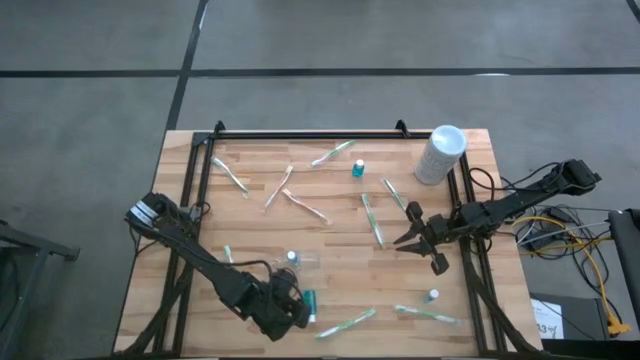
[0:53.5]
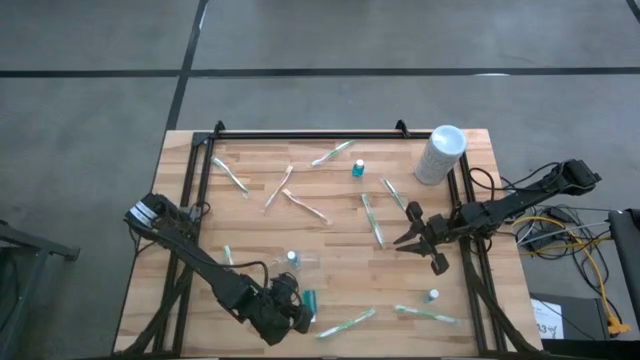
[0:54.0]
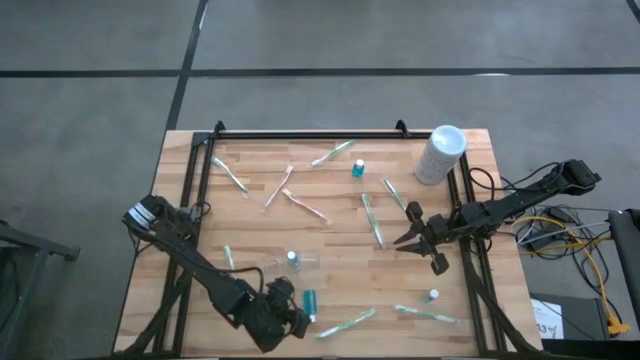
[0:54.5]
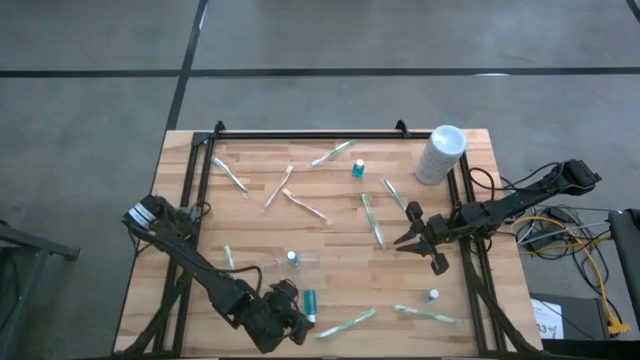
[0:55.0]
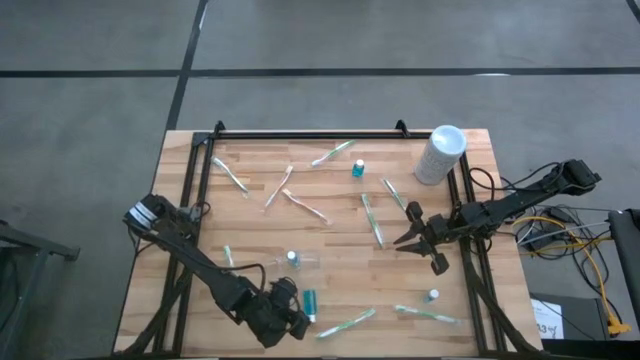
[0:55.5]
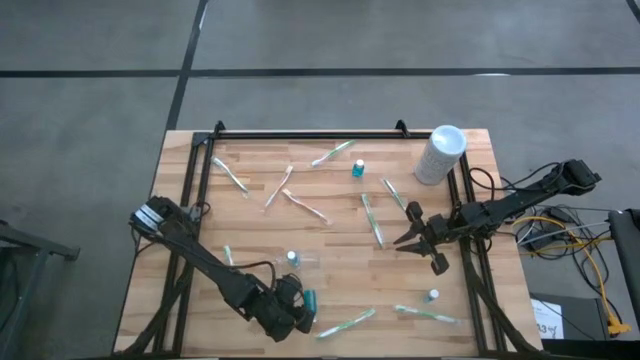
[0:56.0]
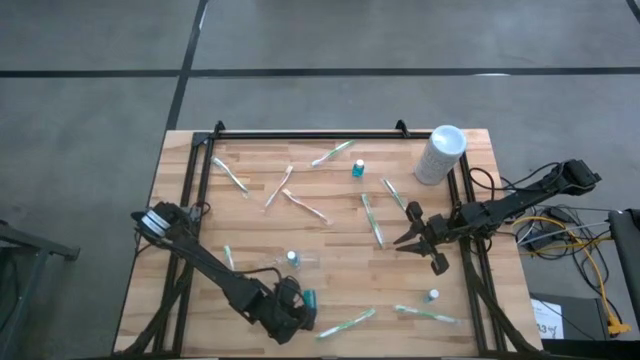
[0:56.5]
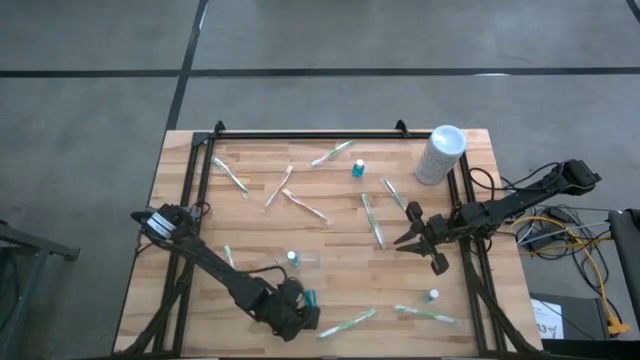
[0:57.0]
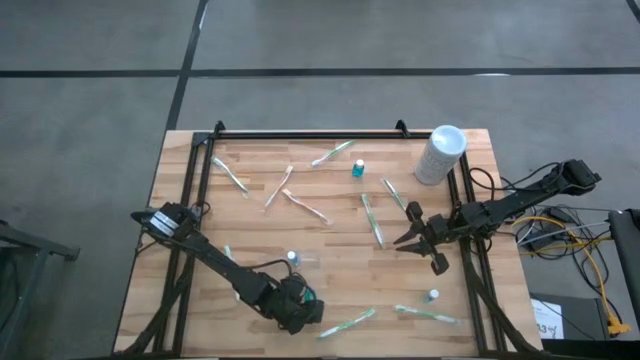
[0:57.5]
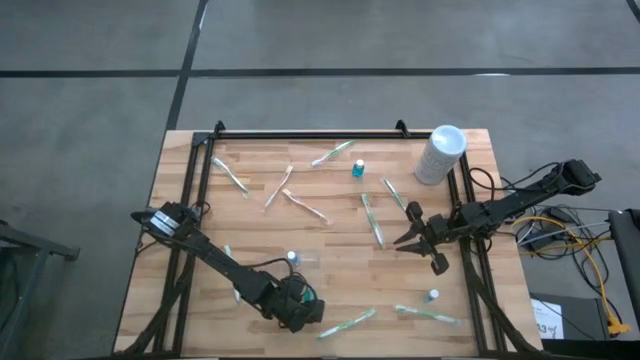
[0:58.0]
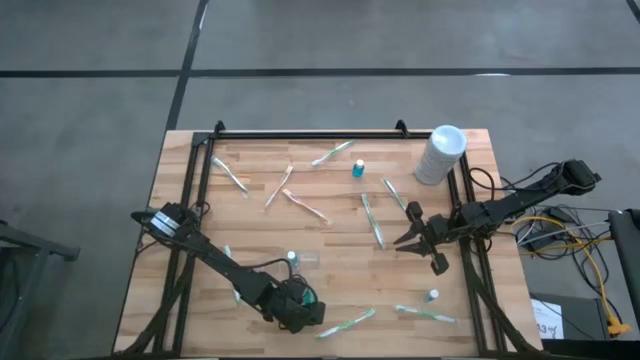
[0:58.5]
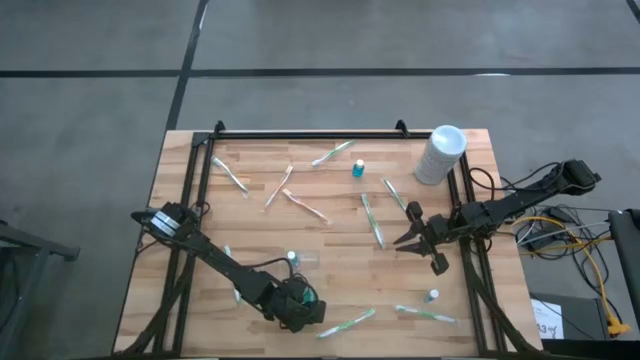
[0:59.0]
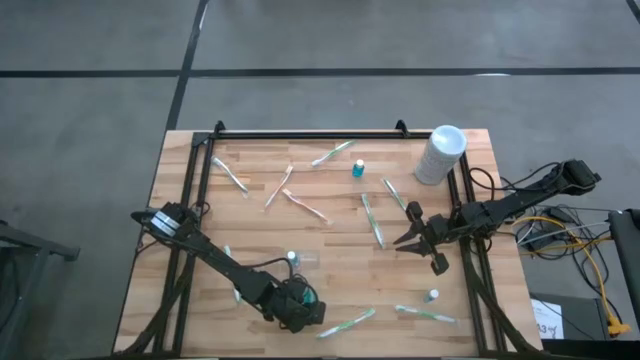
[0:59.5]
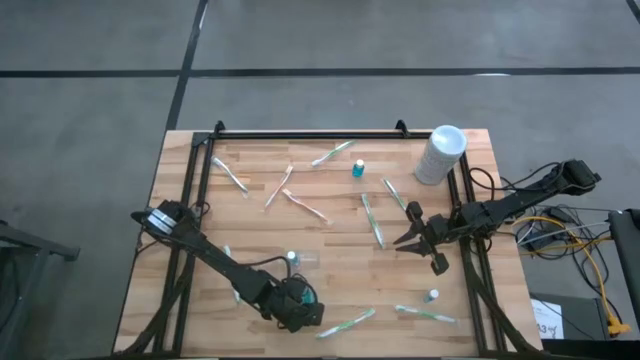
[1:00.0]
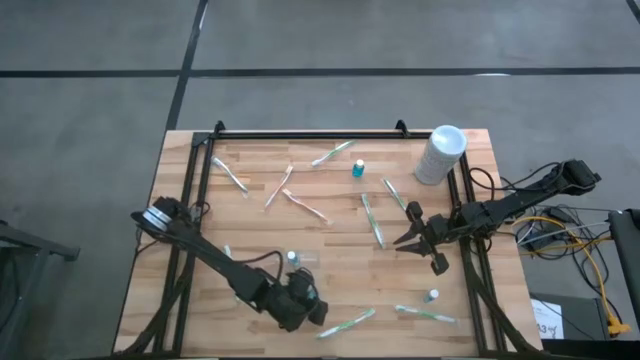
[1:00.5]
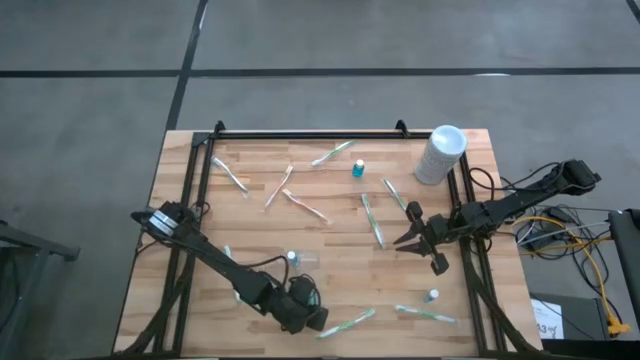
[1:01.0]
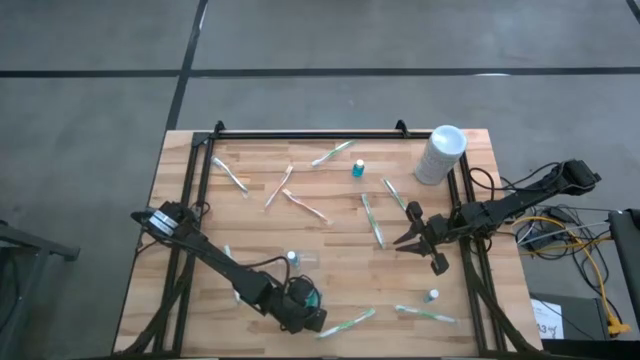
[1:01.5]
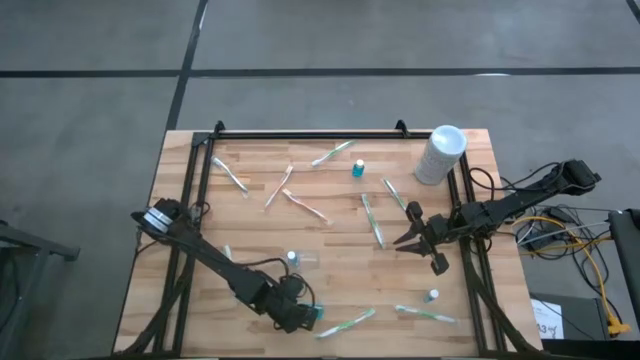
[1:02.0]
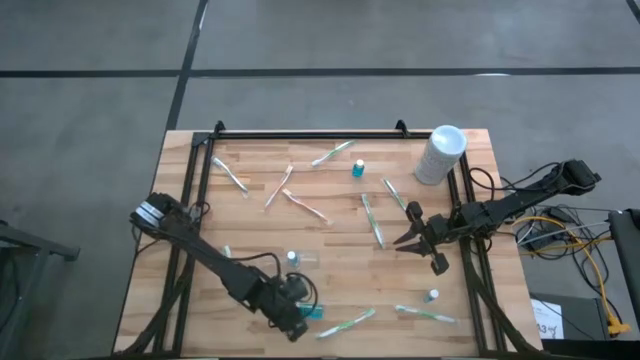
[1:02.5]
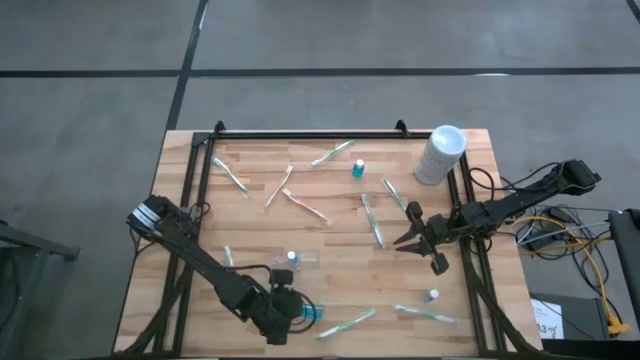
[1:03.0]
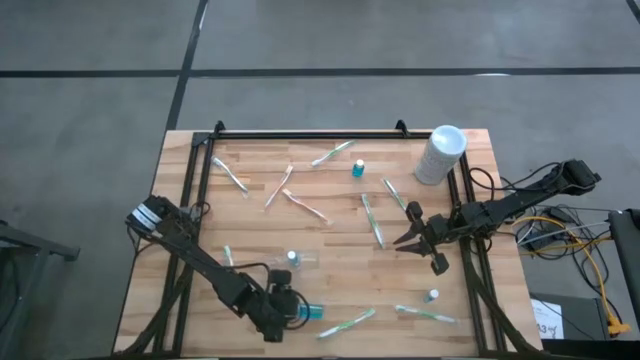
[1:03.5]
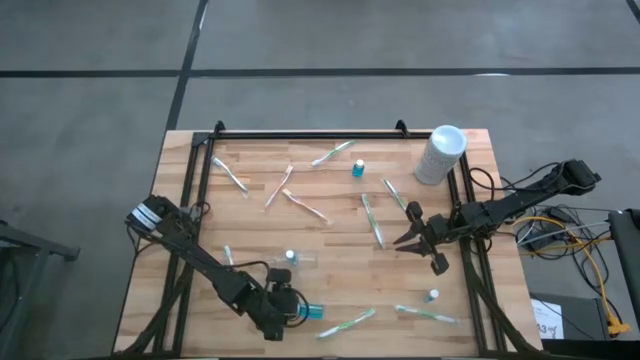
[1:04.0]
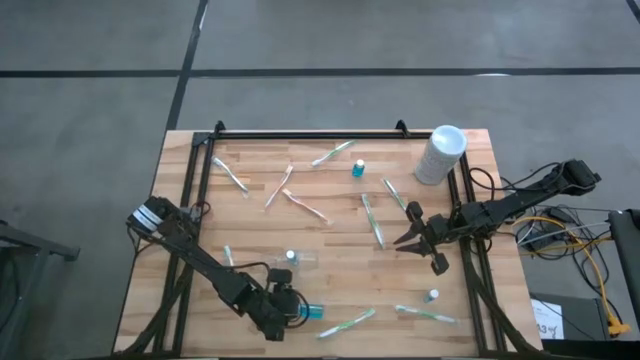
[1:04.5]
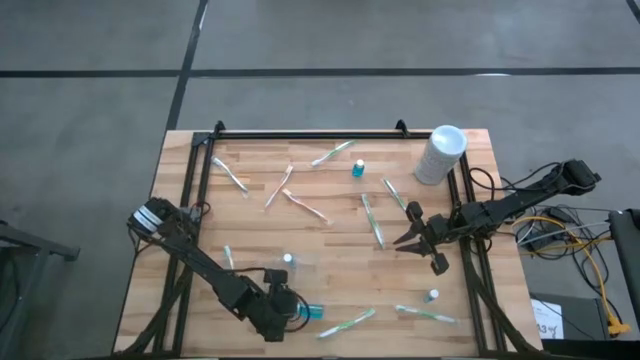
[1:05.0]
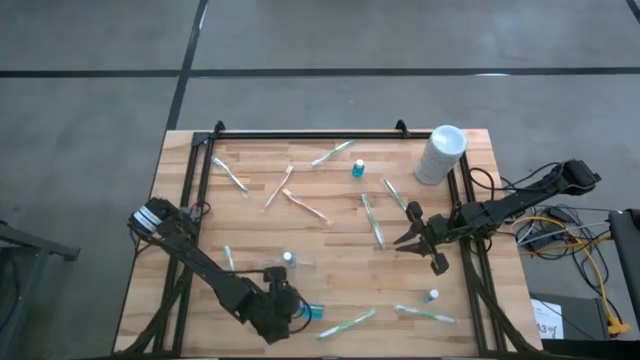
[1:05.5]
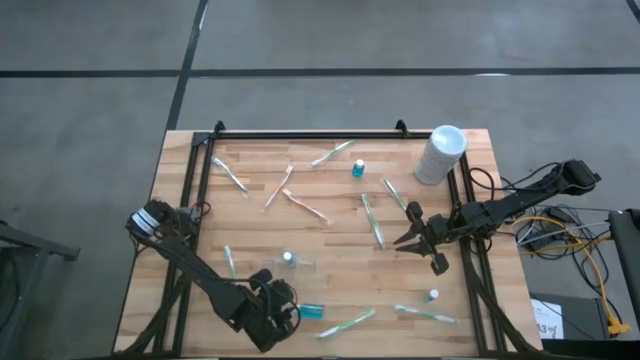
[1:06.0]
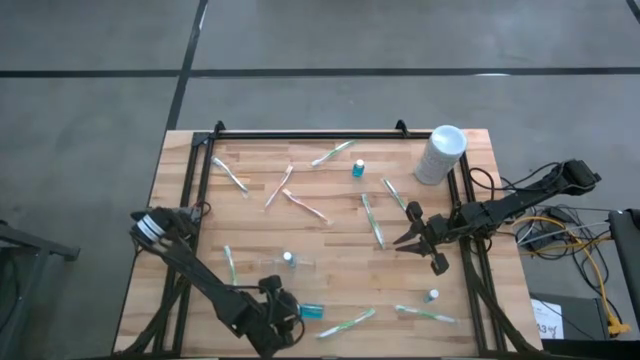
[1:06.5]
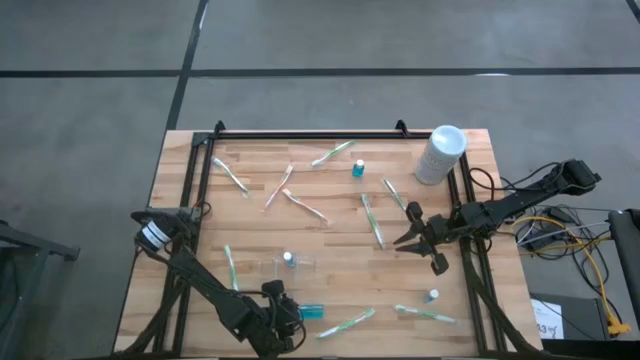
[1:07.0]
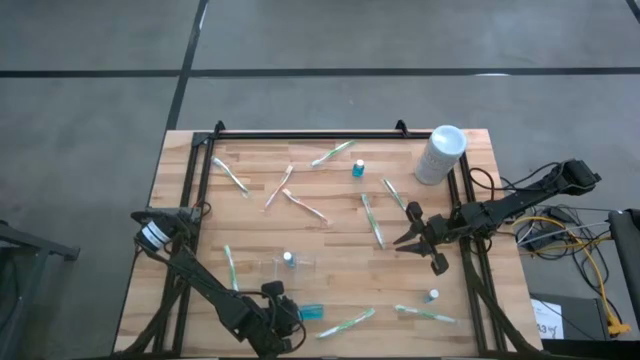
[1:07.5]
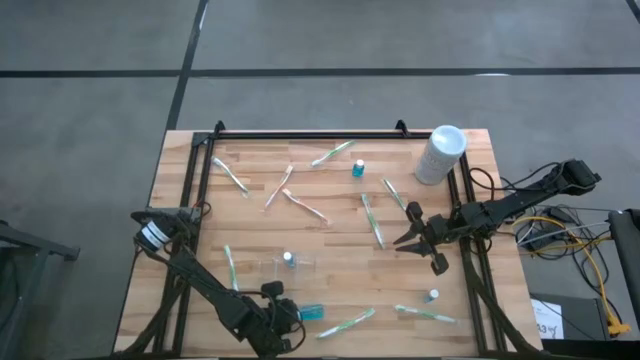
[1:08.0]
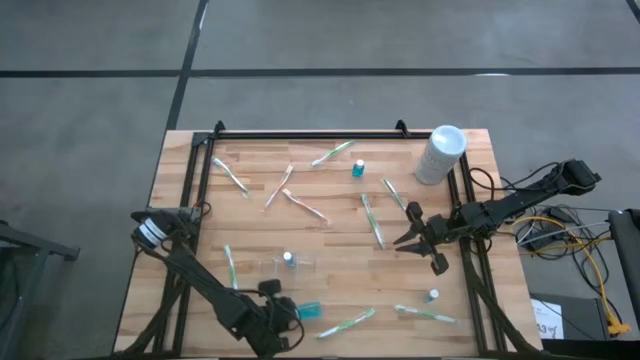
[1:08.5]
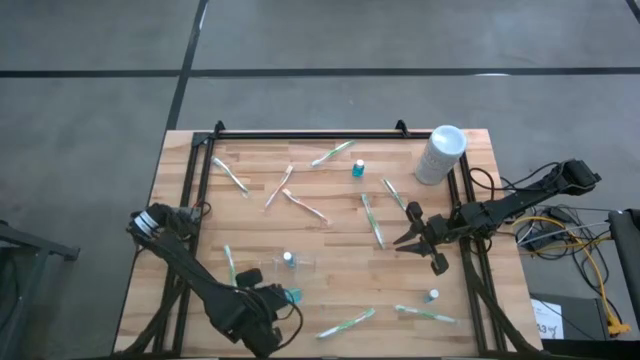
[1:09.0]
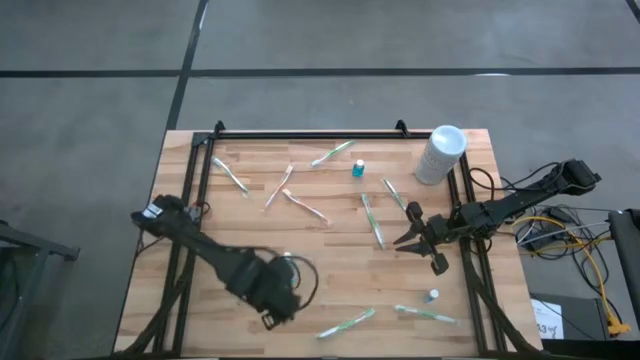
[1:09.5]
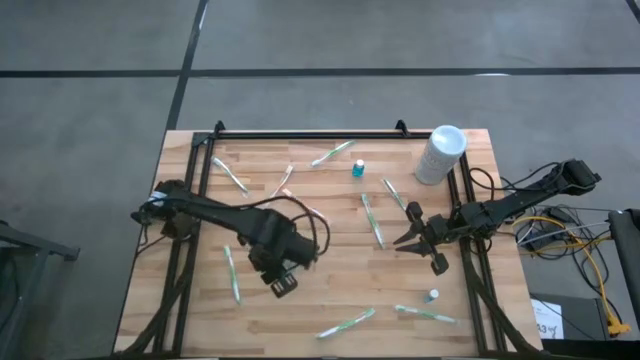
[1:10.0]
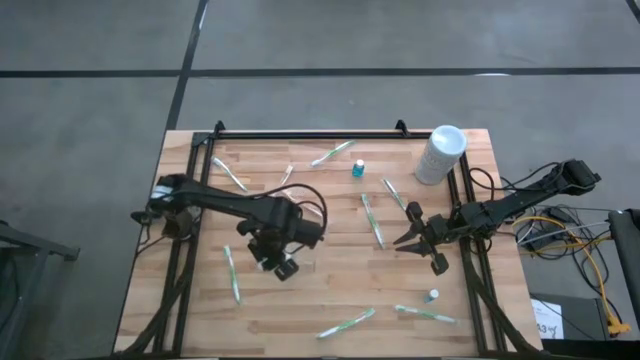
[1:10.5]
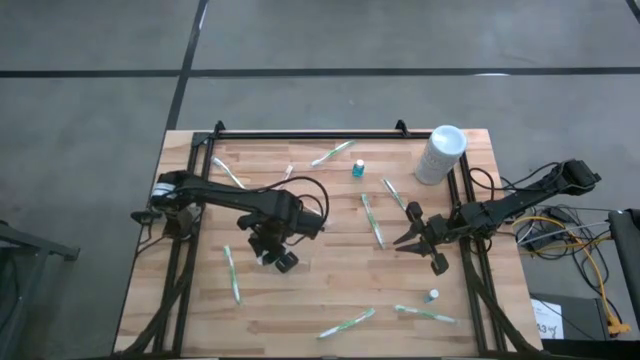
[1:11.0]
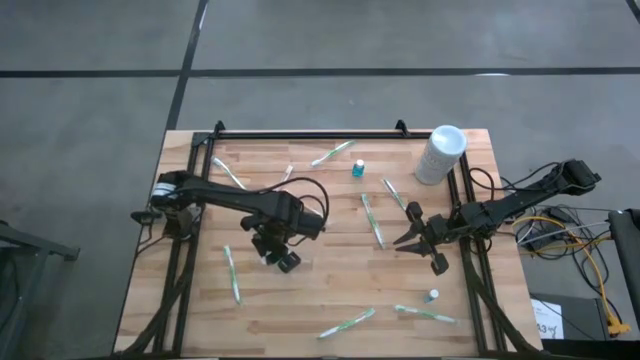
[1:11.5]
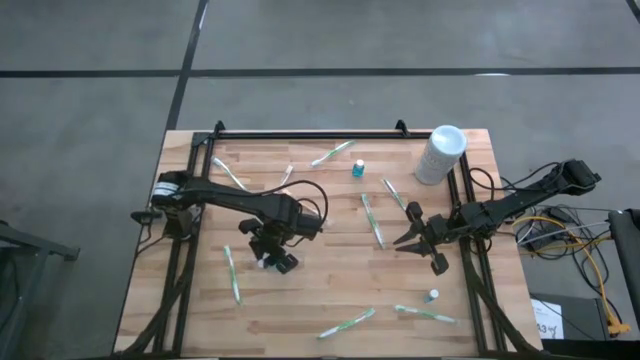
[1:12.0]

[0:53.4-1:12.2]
Task: Pick & Place toothbrushing station
Put the blue mouthwash into the transparent organizer

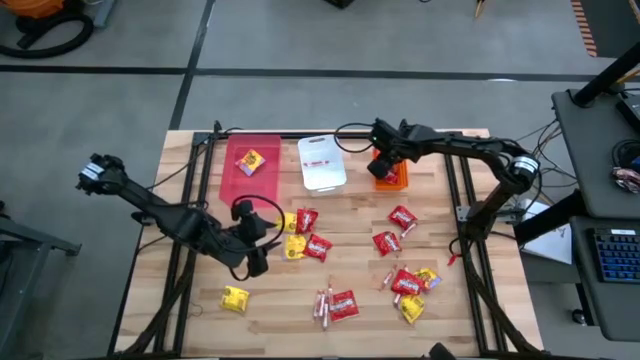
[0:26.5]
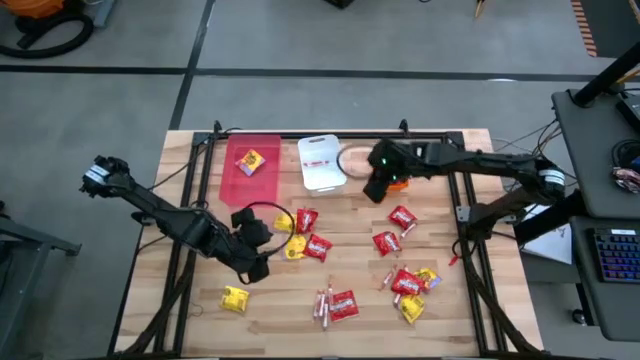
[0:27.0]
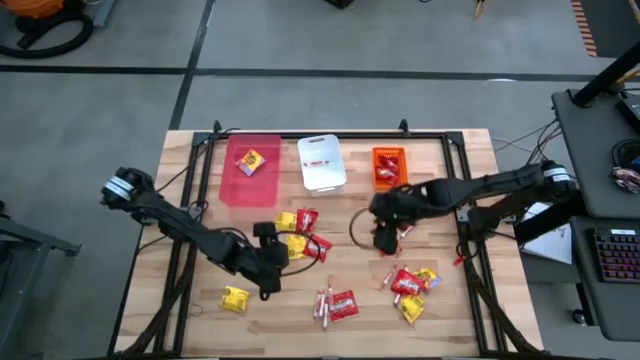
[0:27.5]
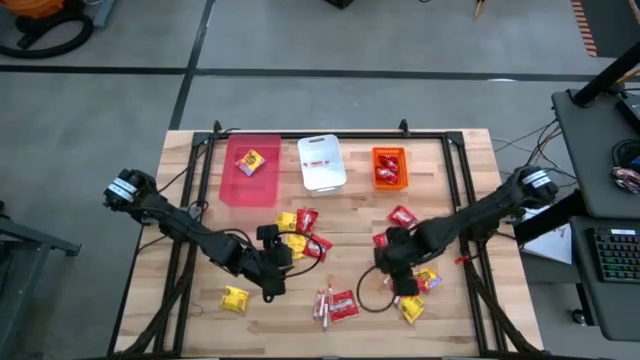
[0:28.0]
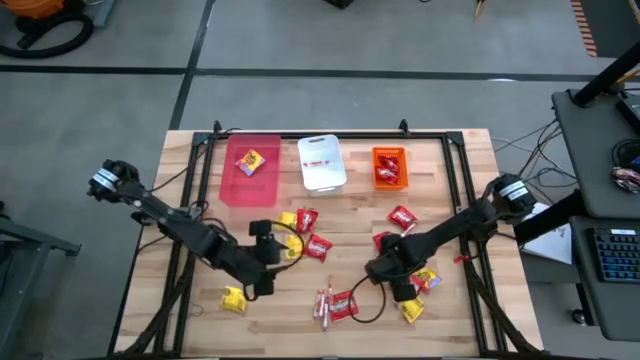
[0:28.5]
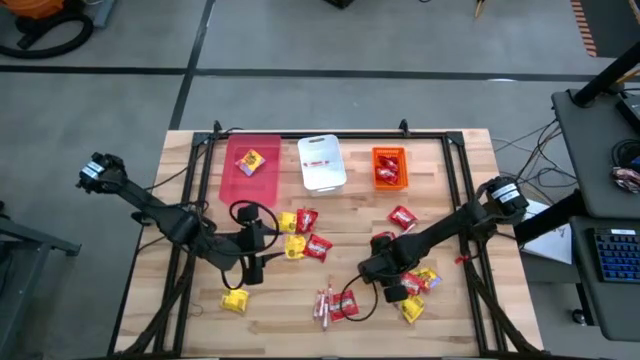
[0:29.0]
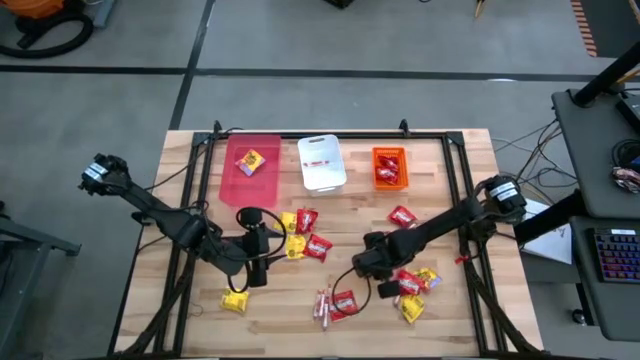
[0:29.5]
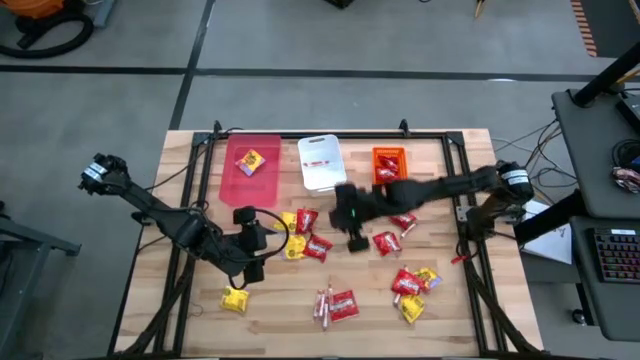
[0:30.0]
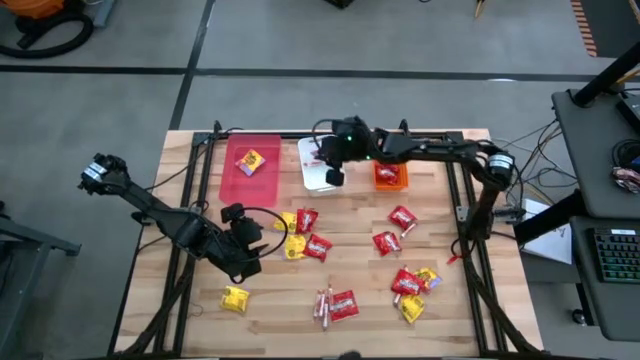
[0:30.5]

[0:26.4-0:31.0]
Task: Sort candy
Put the white candy into the white bin
